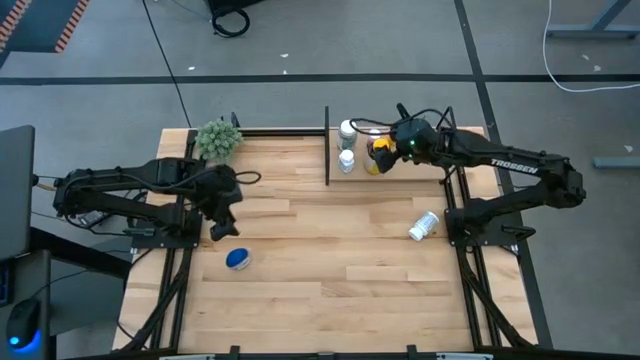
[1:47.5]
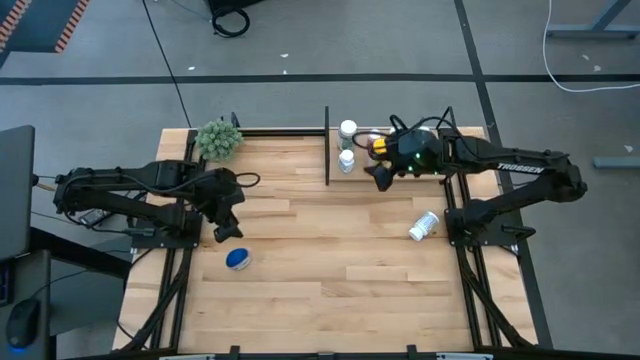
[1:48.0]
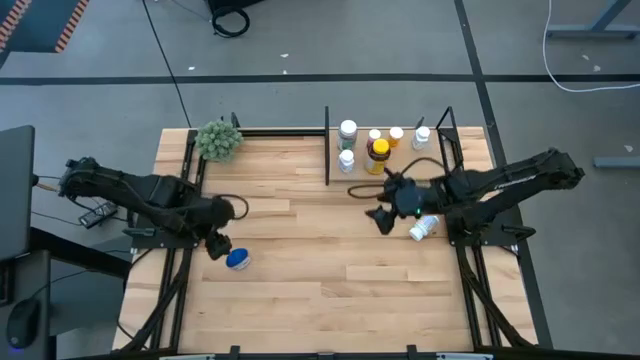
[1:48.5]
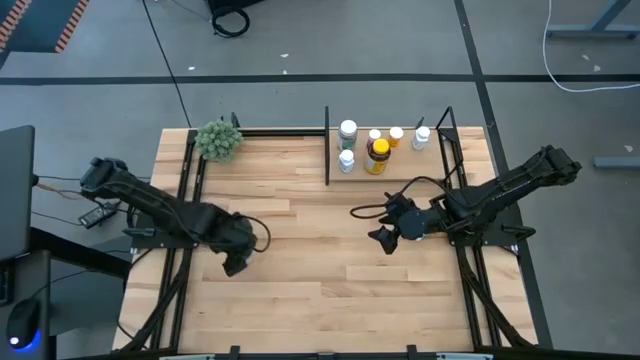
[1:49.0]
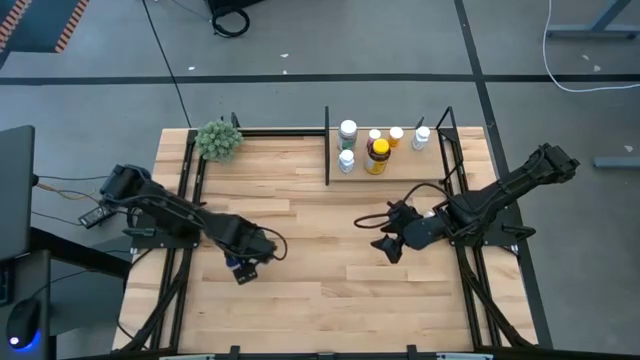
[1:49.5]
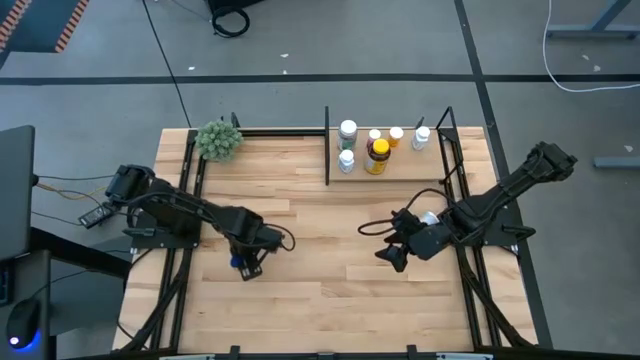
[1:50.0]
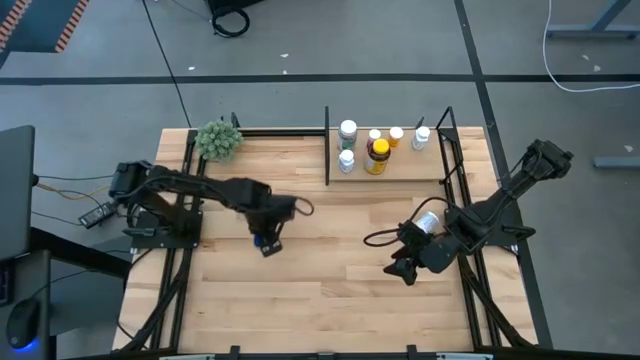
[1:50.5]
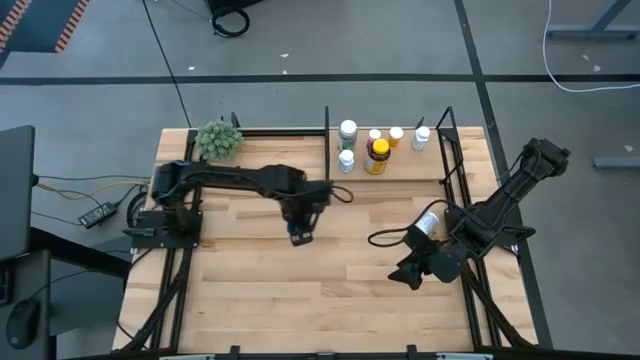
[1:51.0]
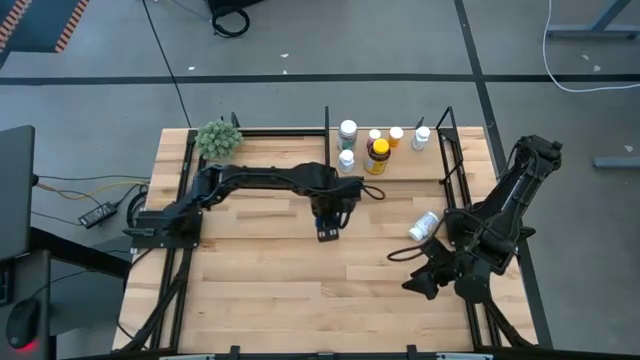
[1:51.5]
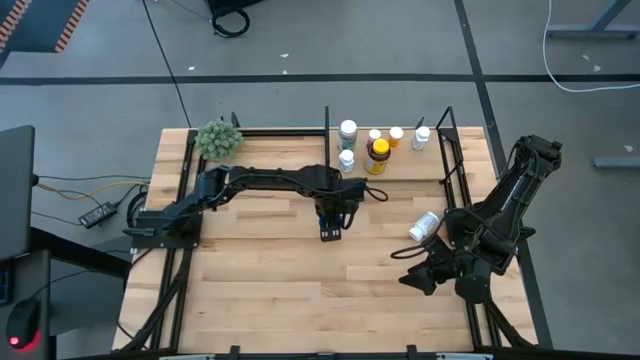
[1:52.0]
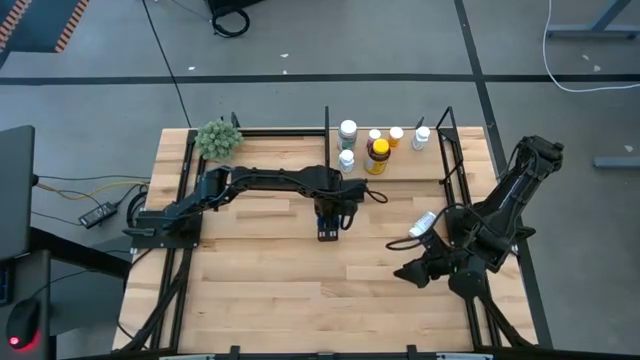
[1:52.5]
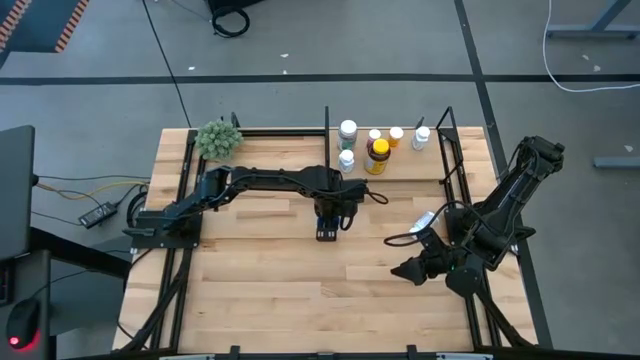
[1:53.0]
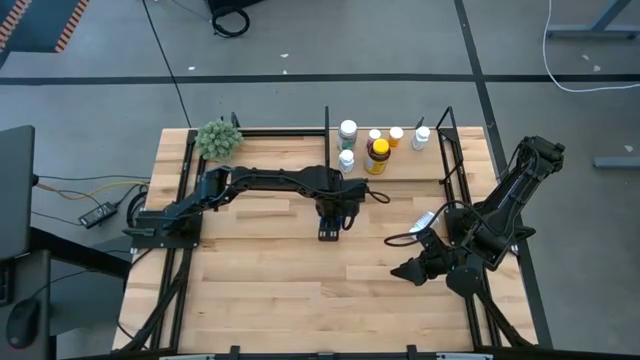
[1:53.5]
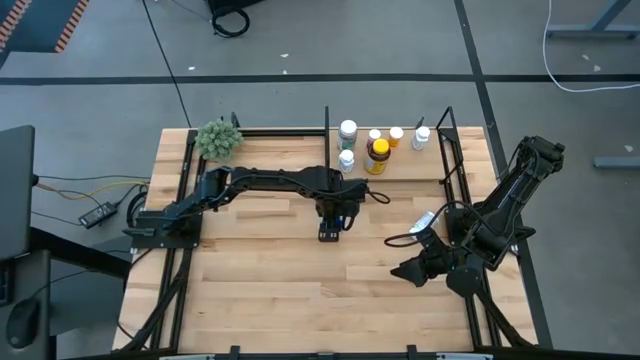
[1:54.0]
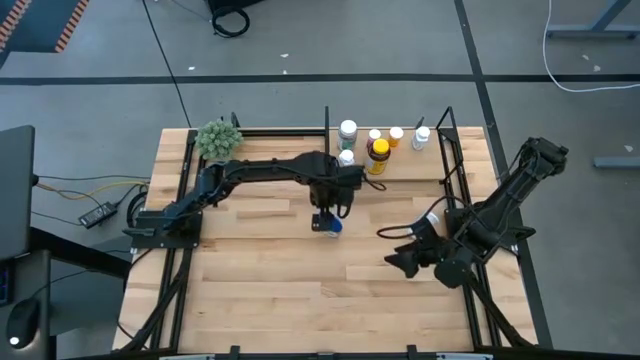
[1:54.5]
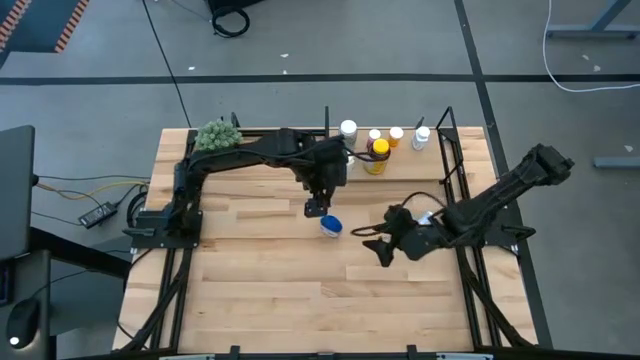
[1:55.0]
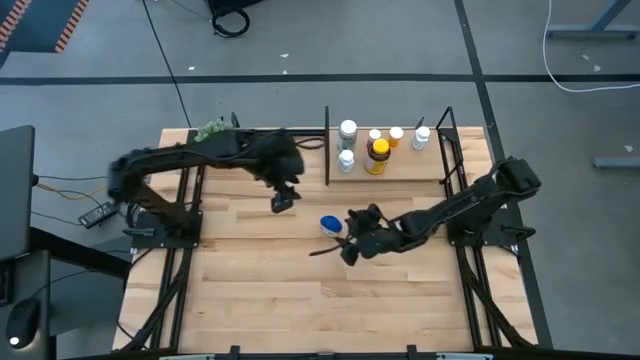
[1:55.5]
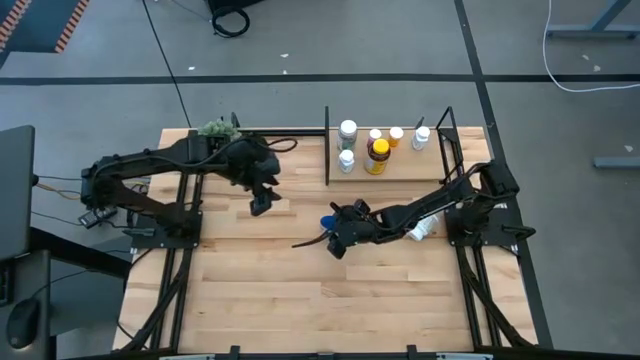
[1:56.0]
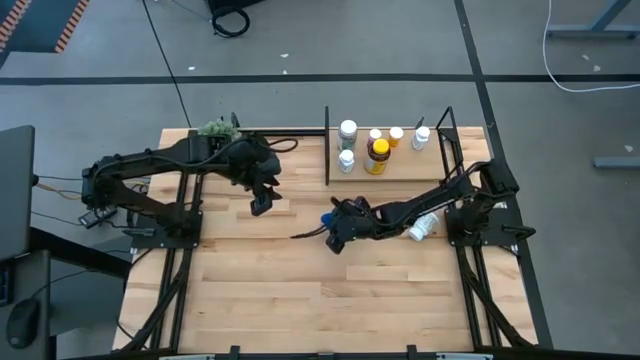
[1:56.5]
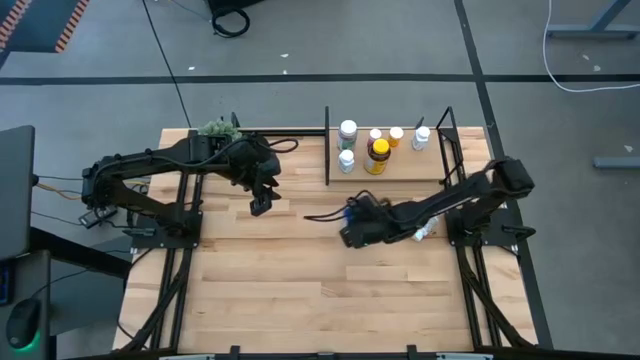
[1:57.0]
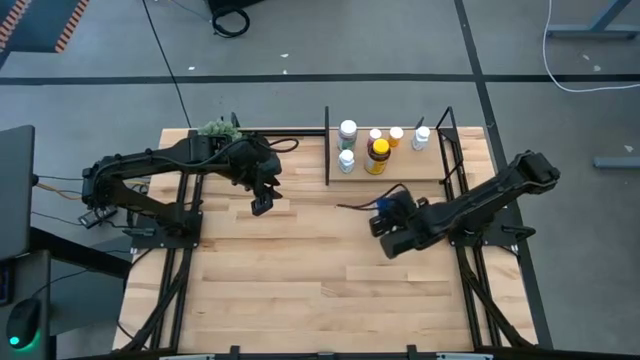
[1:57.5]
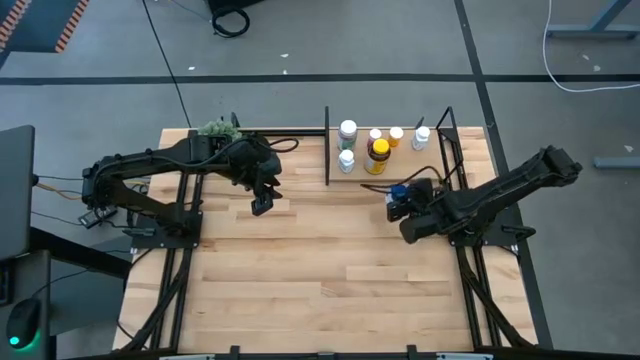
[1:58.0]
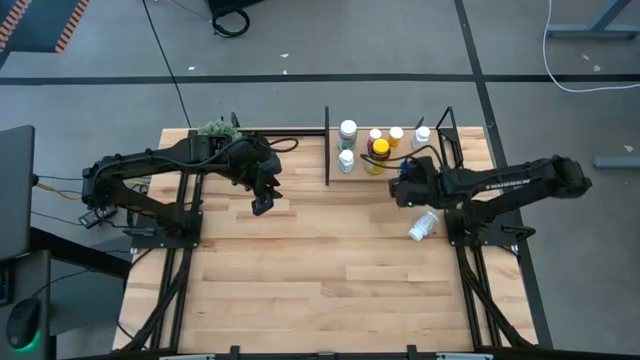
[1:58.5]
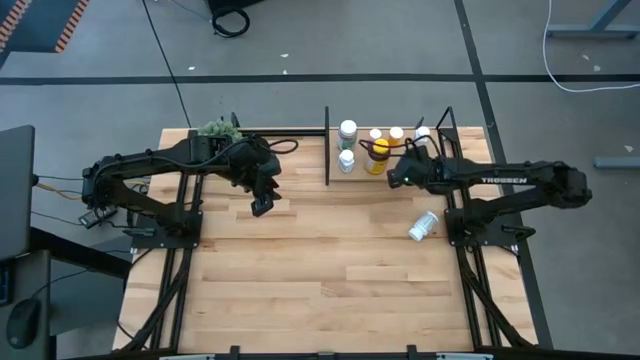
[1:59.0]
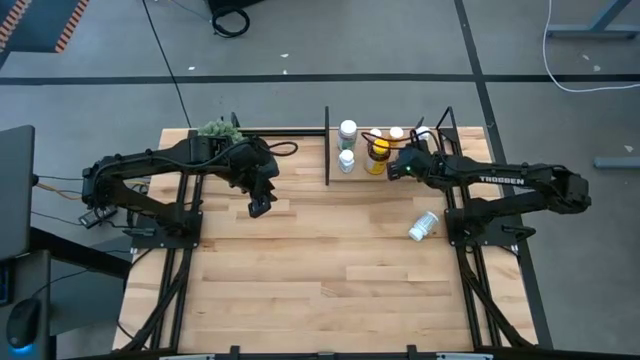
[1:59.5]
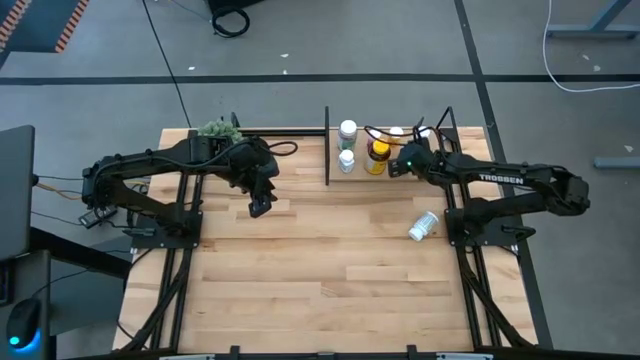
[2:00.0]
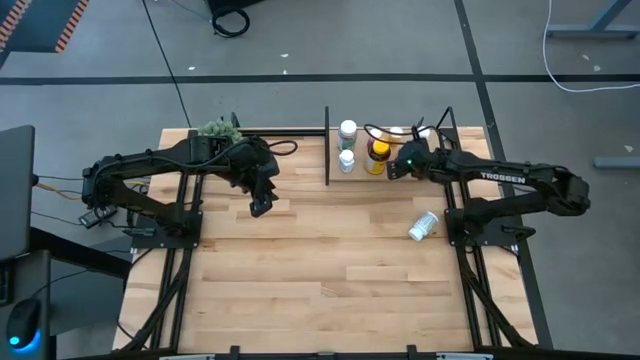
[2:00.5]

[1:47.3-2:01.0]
Task: Pick and place medicine bottles onto shelf by color
Put the blue pill bottle on the shelf

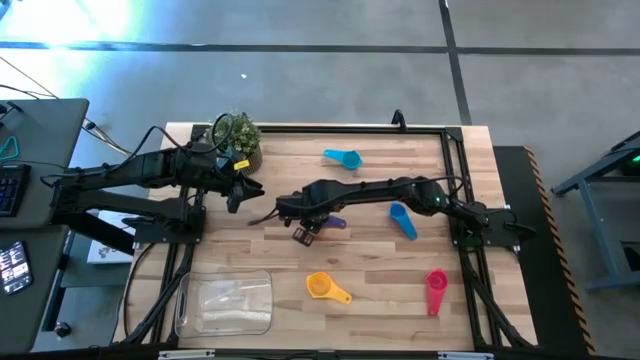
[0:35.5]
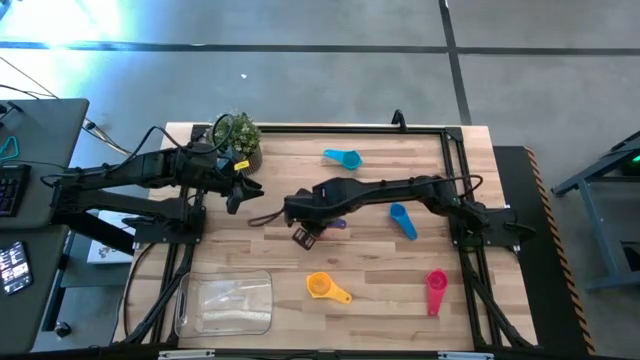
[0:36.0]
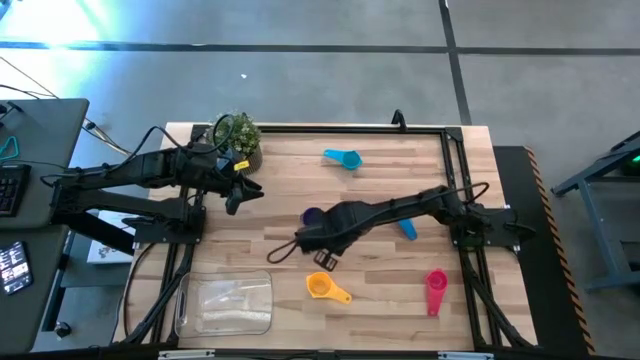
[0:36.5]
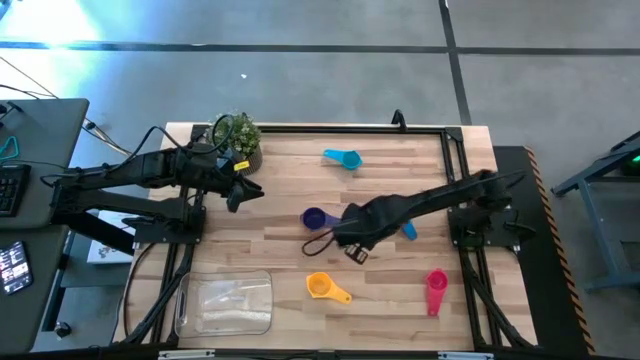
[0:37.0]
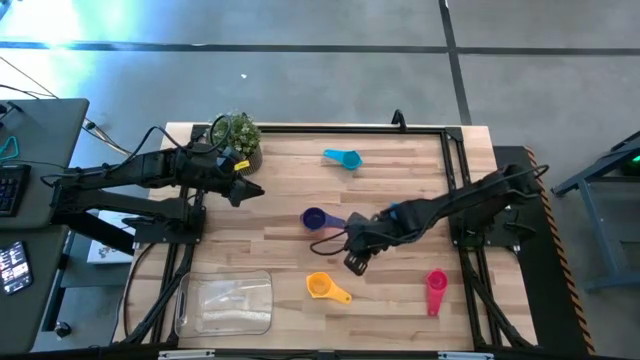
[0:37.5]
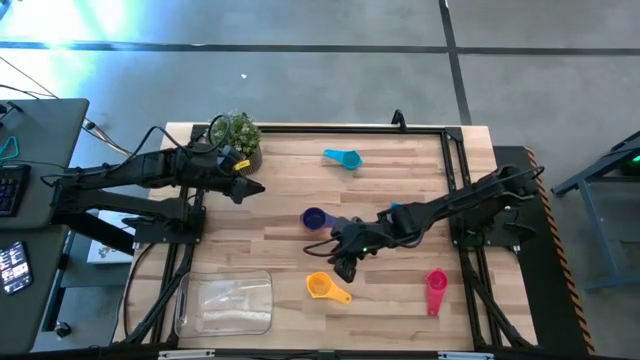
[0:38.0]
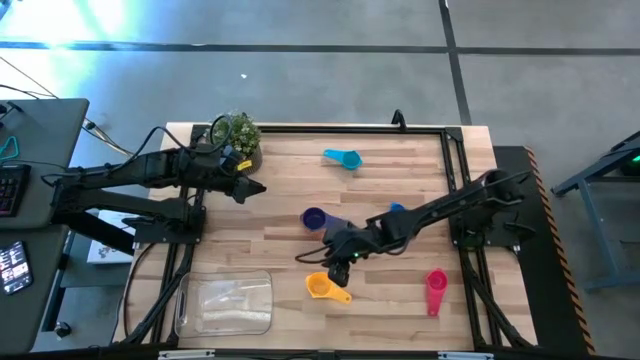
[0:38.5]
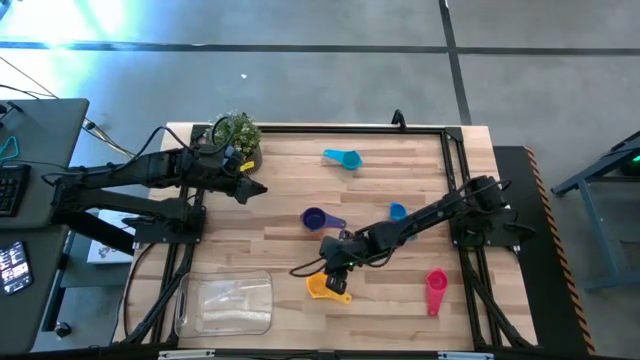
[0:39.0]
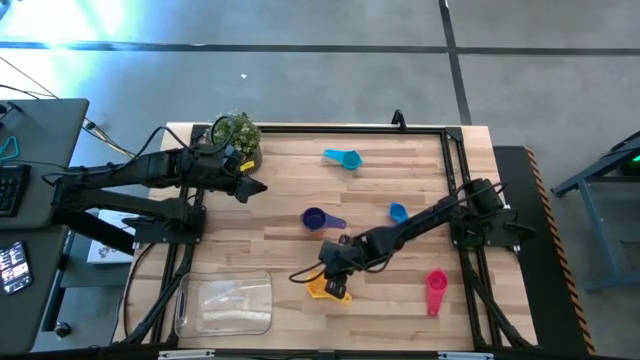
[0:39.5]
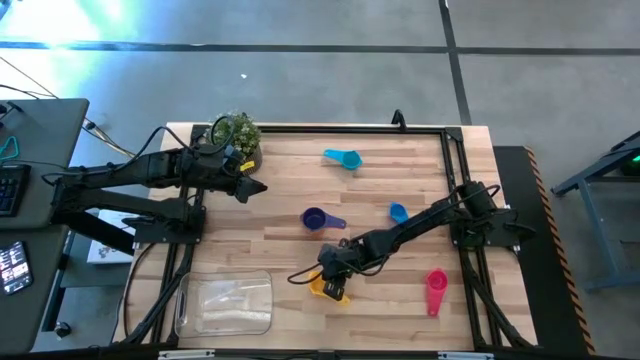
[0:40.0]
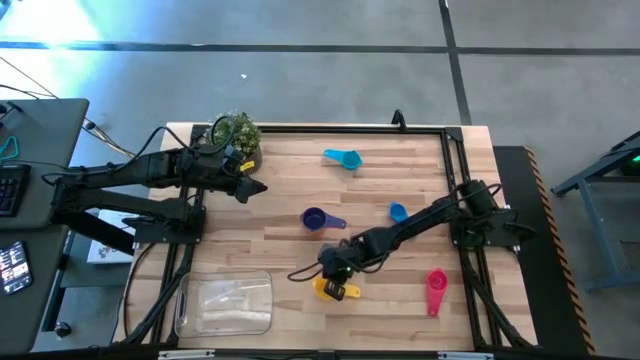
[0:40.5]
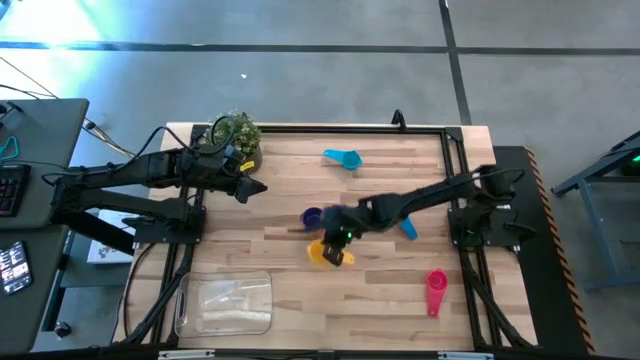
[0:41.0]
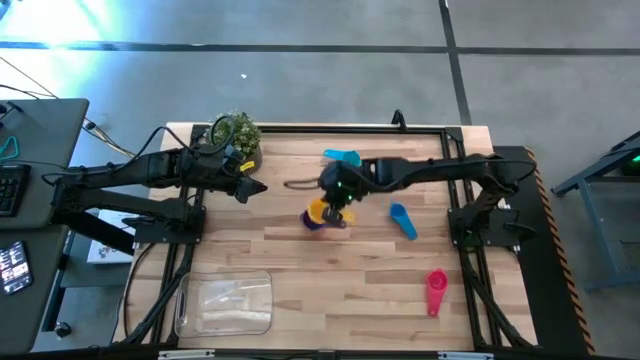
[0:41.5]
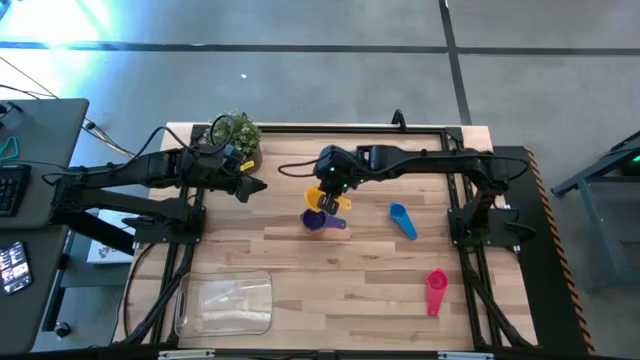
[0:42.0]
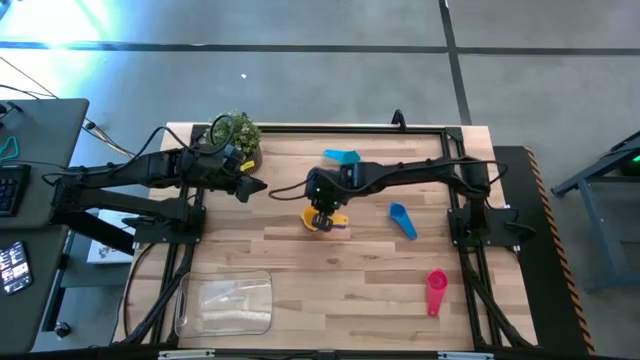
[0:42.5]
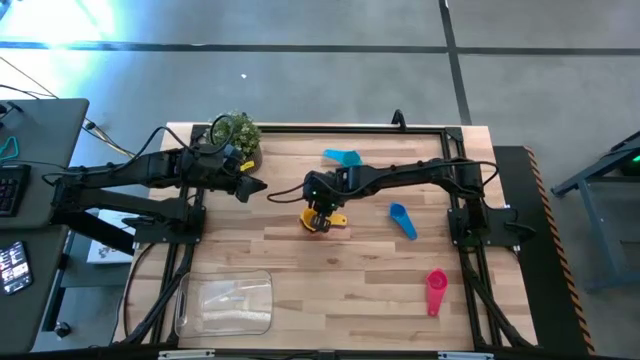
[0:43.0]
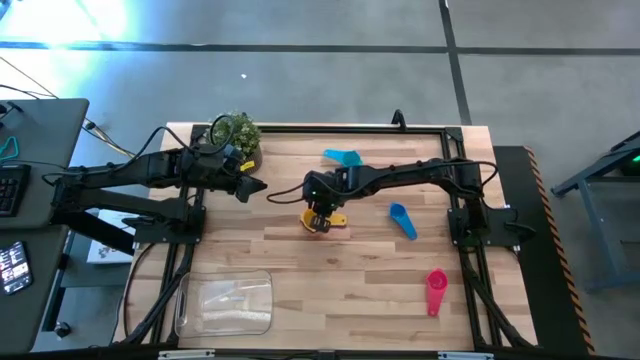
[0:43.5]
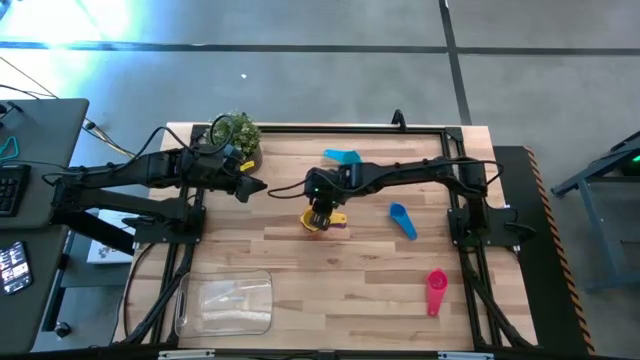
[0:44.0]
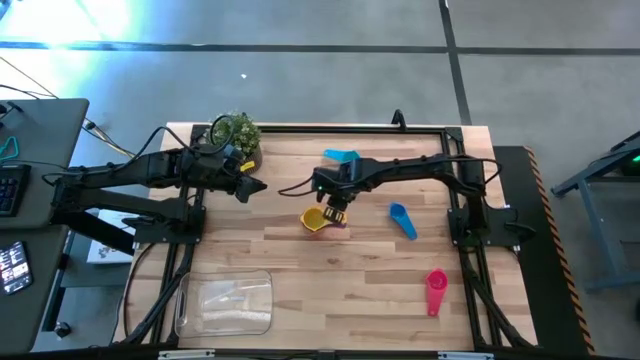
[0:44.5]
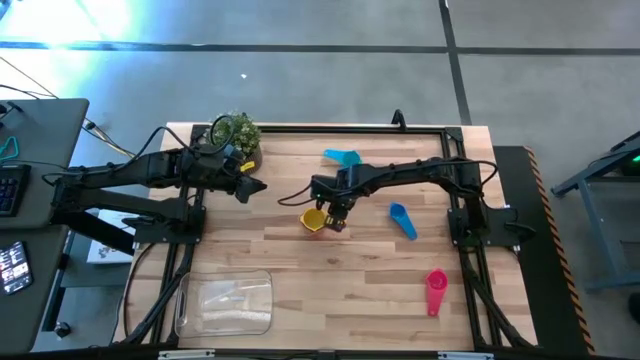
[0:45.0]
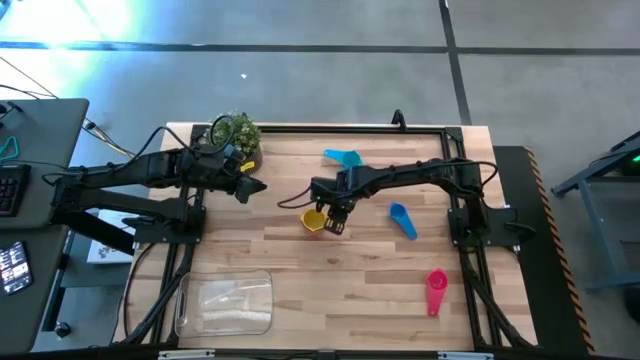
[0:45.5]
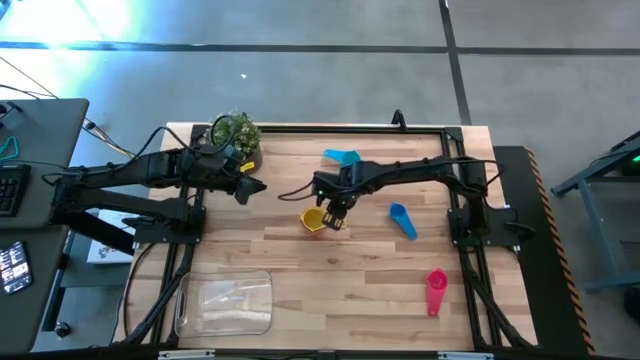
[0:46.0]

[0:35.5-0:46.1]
Task: Nest measuring cups in basket
Stack the yellow measuring cup on the blue measuring cup
